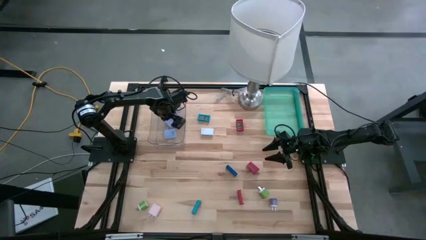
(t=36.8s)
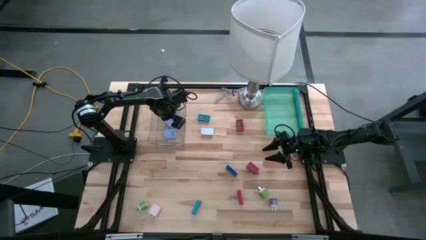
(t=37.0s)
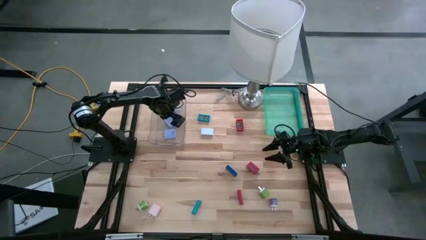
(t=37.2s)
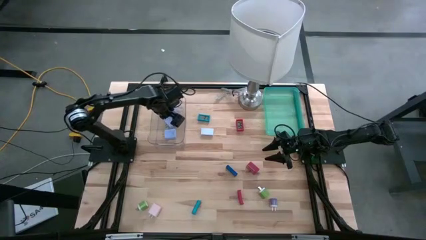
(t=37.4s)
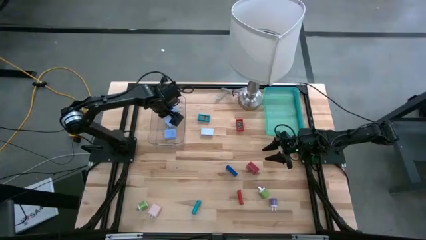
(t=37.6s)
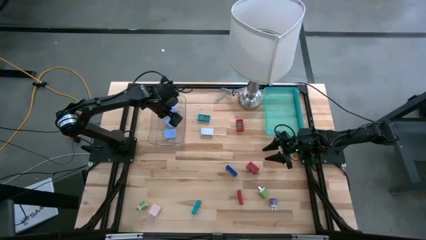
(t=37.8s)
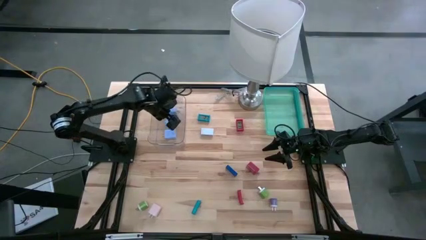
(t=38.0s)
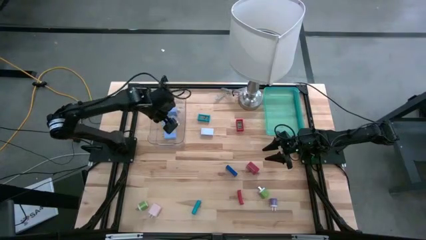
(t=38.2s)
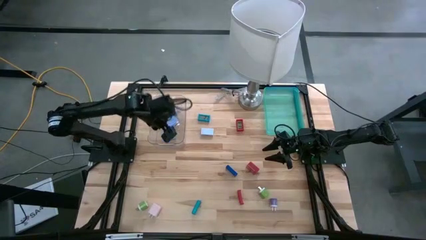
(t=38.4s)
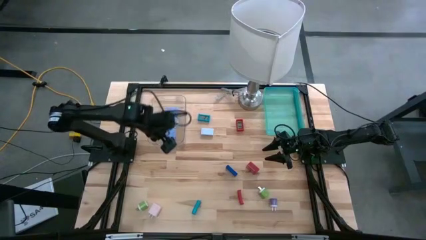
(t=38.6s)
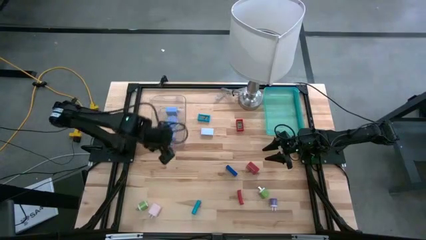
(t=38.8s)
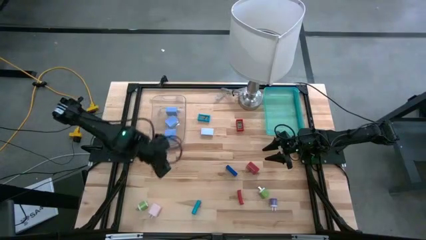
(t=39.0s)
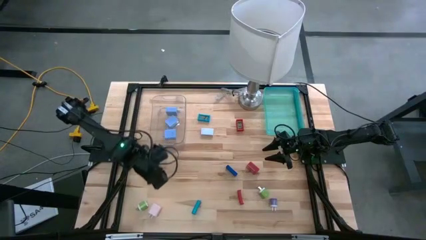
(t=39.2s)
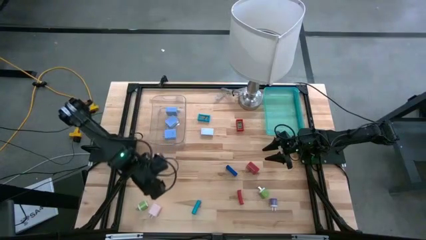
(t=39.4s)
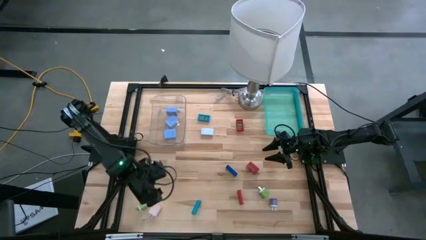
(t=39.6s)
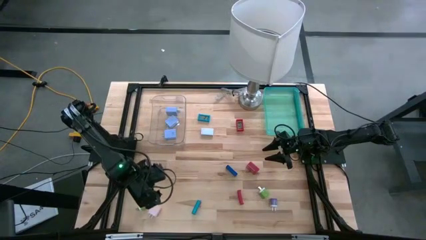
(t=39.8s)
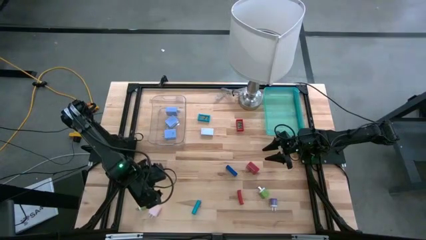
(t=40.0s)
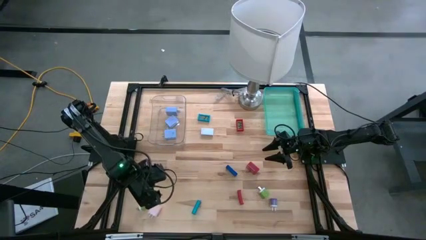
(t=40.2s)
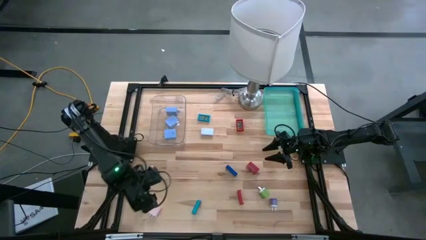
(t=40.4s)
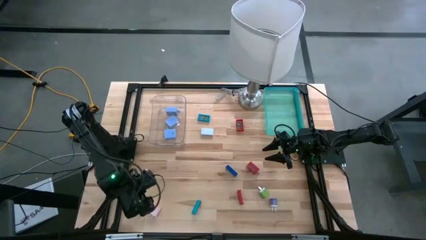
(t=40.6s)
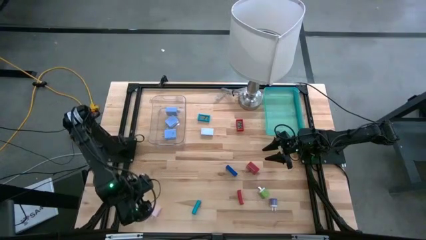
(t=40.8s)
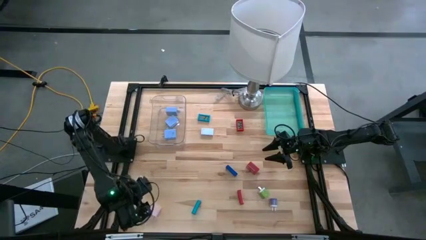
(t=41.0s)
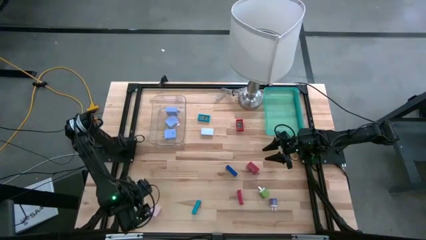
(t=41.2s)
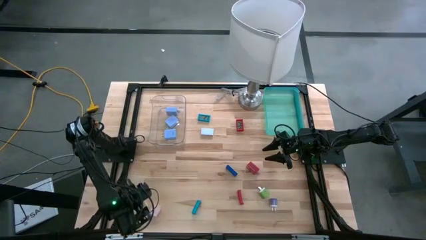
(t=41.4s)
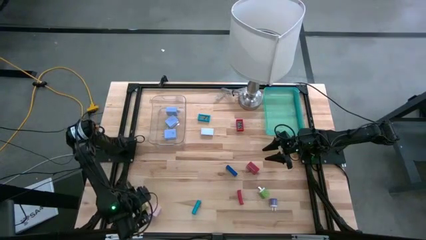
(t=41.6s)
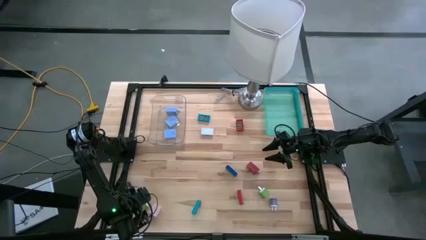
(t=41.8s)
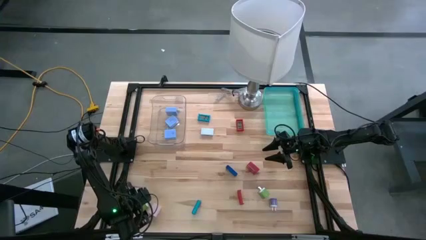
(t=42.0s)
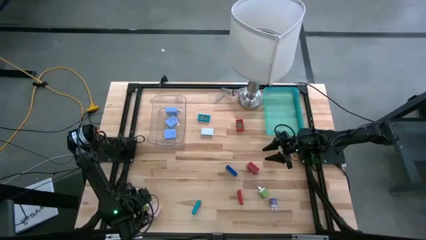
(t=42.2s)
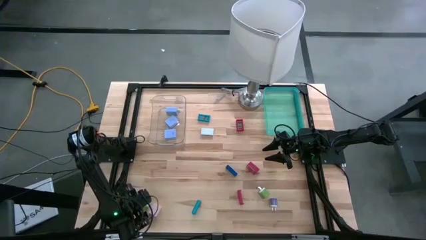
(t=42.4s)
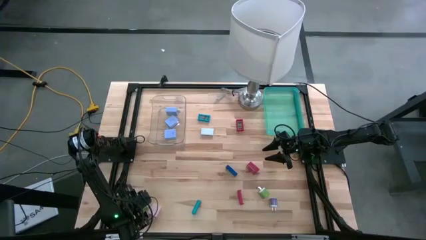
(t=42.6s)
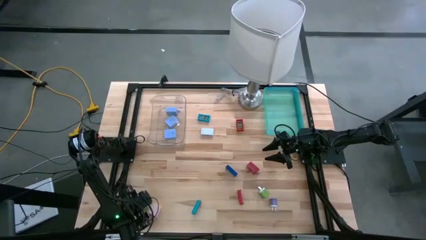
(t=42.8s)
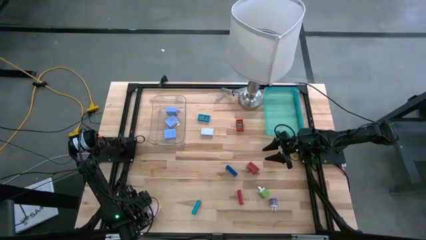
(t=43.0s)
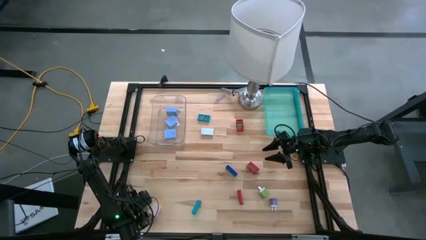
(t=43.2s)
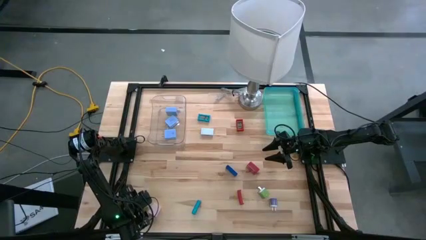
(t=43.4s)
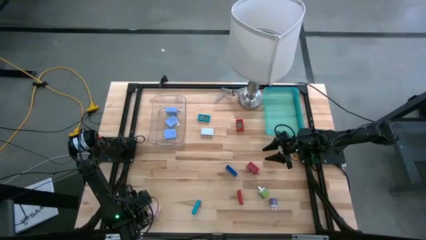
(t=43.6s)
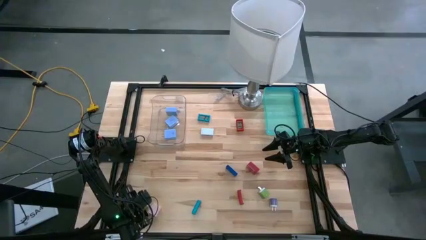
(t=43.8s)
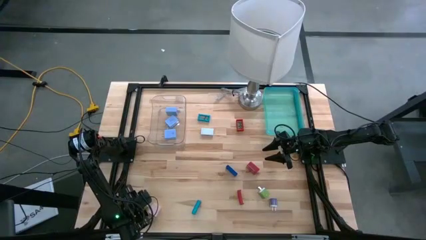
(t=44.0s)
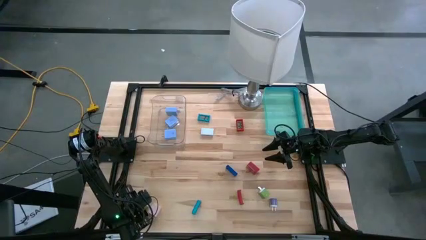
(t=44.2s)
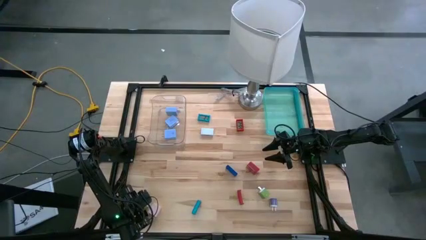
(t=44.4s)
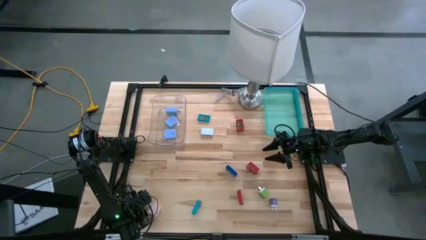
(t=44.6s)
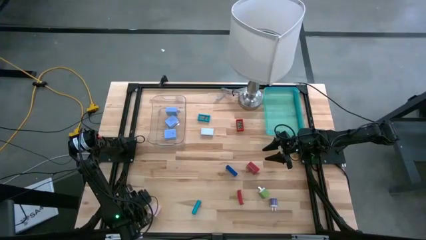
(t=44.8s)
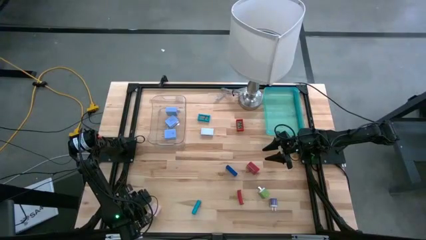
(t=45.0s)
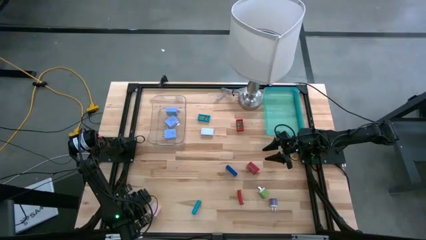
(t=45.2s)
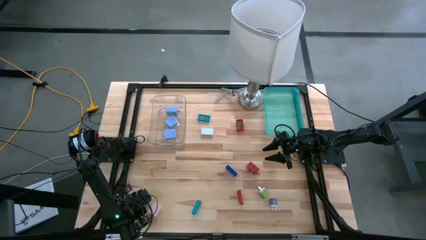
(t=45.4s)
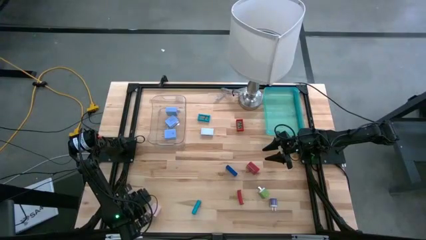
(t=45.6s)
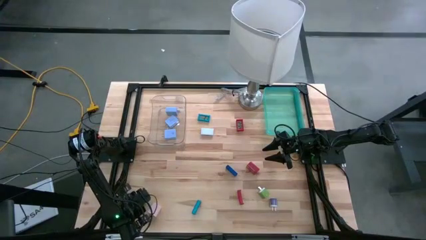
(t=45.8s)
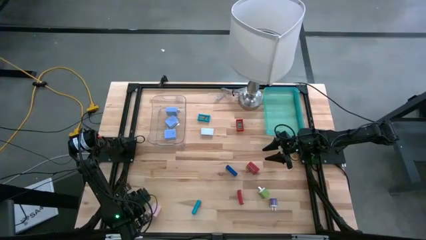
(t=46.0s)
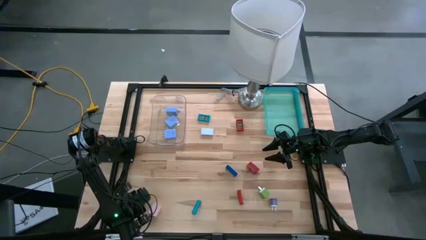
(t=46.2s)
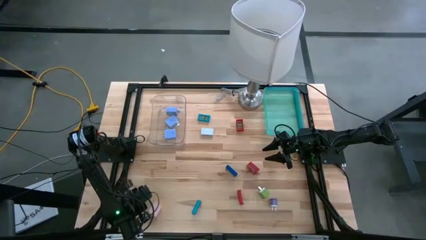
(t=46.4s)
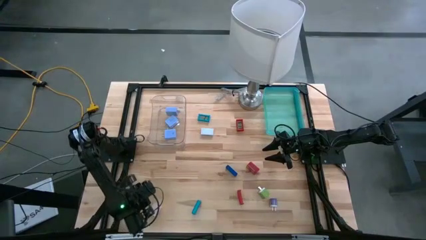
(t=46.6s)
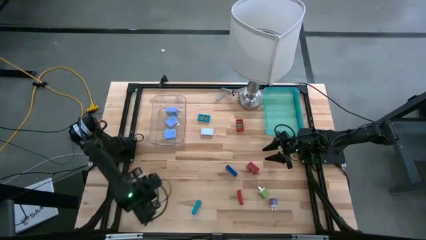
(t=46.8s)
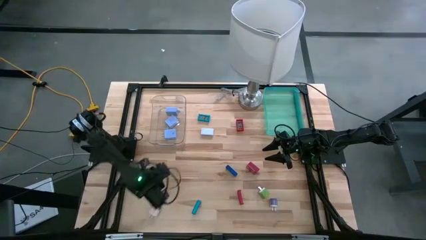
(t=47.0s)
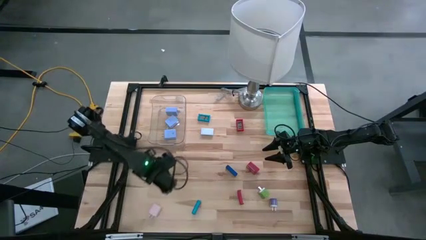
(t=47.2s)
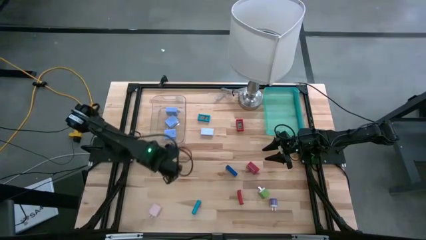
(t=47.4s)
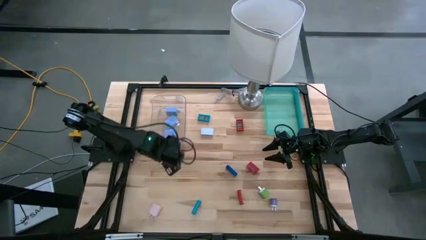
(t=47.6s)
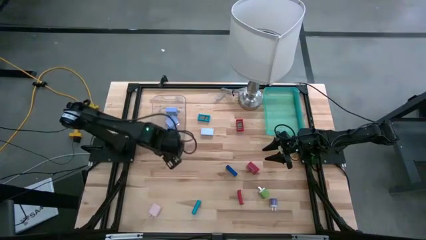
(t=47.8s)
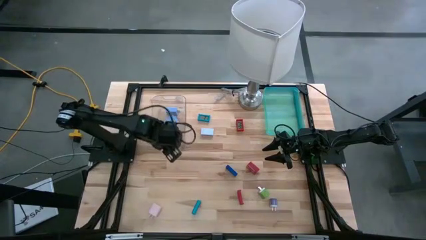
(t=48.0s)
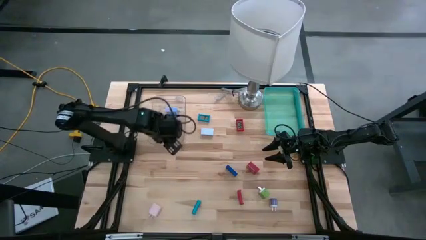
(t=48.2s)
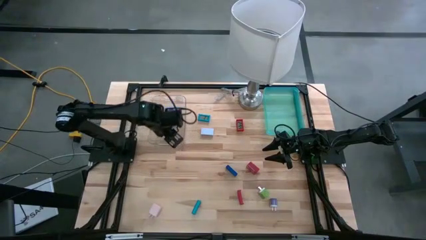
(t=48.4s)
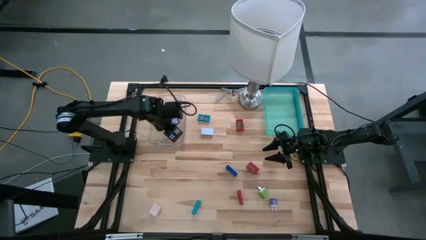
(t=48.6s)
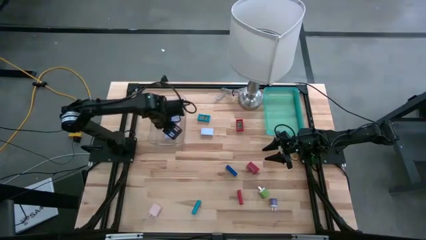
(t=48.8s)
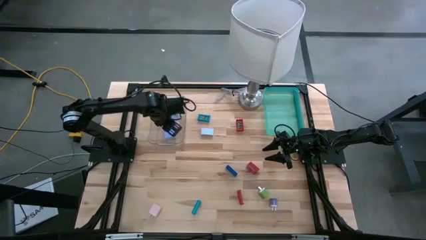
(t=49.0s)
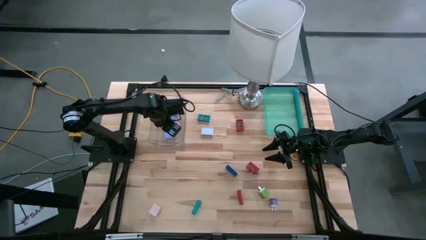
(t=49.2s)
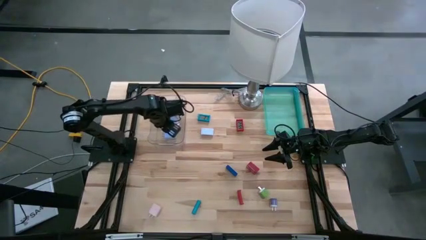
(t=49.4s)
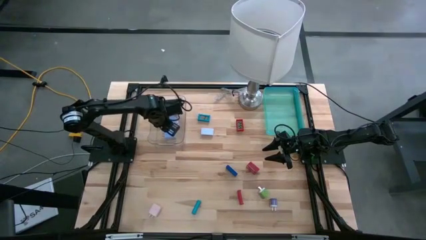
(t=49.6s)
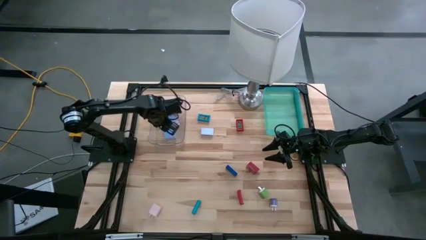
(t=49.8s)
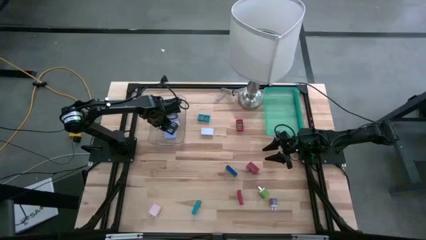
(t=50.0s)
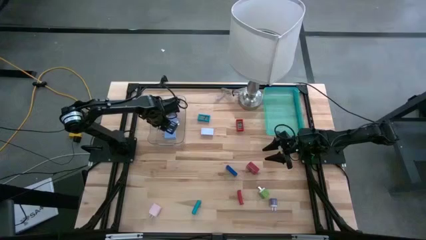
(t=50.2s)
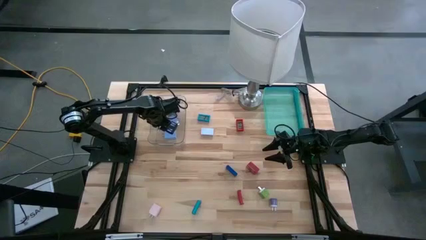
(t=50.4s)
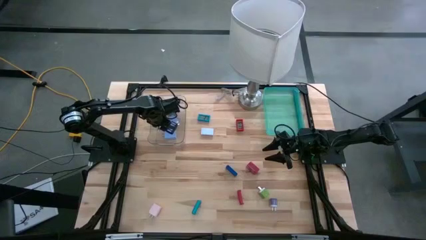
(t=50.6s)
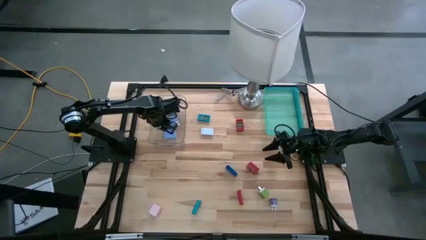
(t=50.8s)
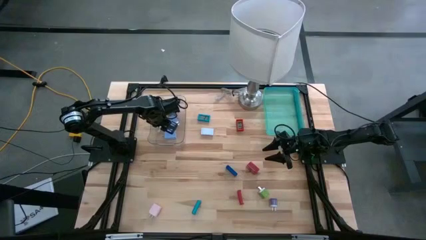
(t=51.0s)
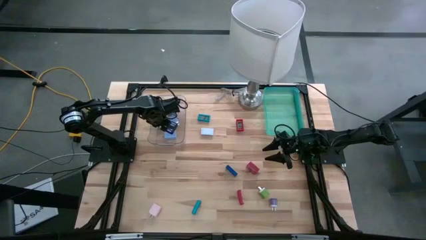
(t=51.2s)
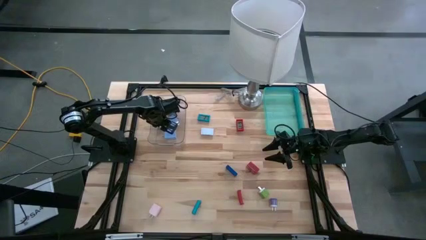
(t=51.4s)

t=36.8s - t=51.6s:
Task: Pick & Place Office items
Put the bottom left green charger adapter into the transparent bin

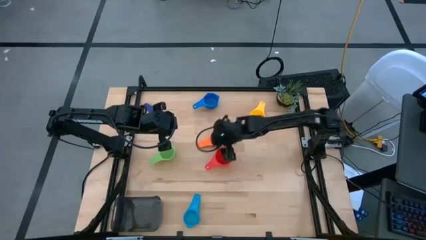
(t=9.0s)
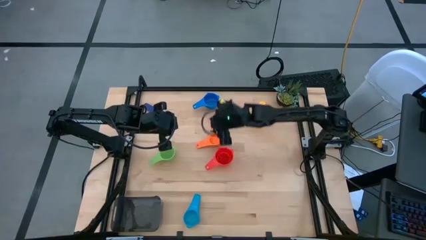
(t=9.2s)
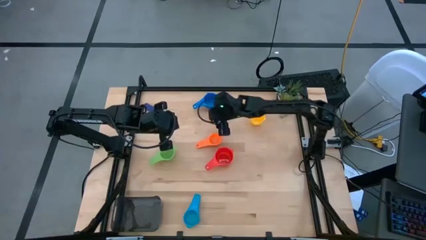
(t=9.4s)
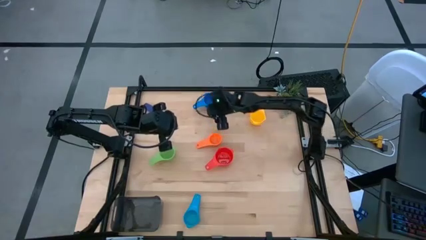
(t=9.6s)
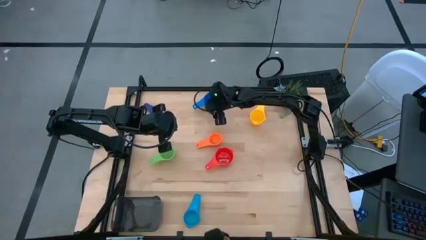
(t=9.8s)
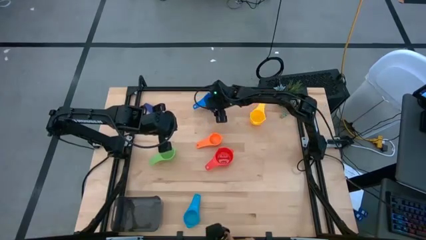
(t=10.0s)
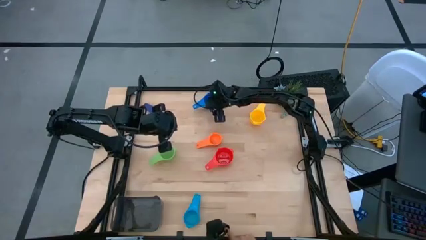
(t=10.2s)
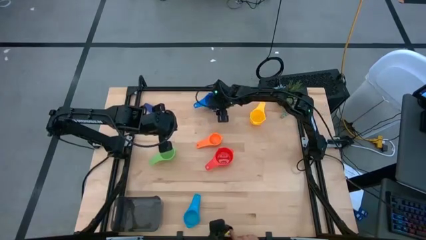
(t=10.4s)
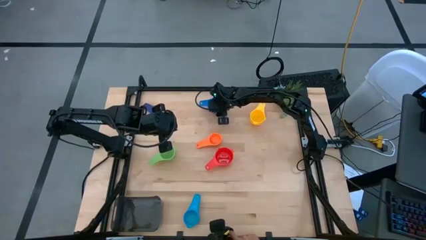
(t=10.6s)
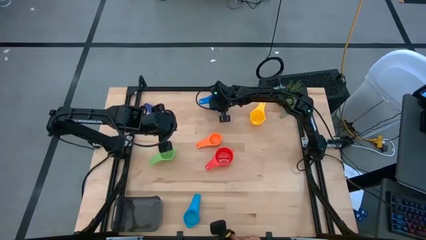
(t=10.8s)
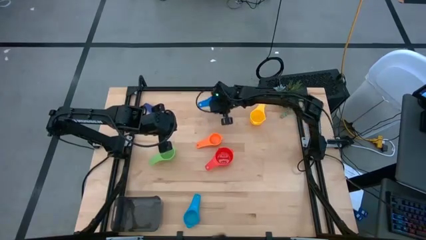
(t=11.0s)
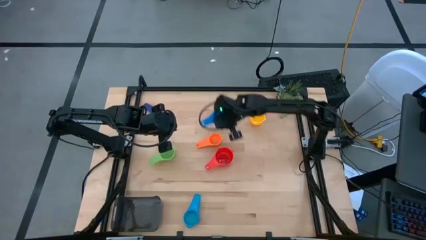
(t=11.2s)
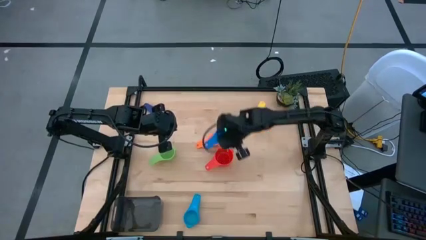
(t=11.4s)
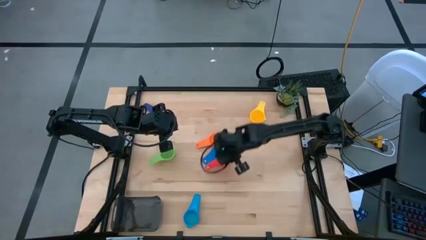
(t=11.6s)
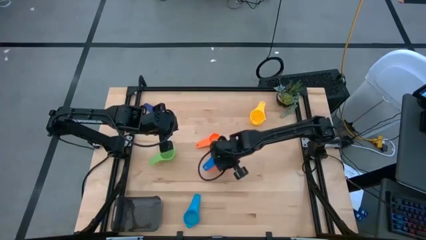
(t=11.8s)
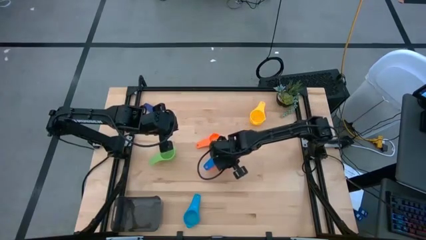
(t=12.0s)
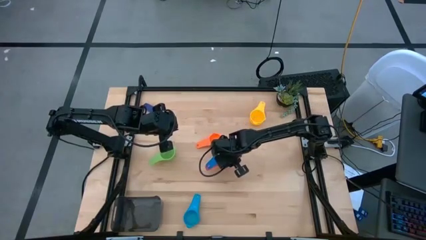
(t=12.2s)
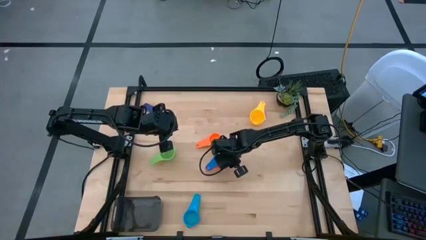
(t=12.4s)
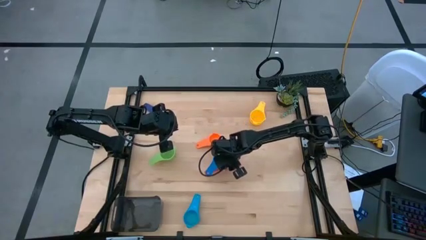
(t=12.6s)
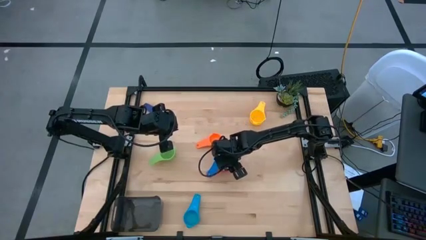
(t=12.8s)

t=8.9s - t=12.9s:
Task: Nest measuring cups in basket
Stack the blue measuring cup on top of the red measuring cup
